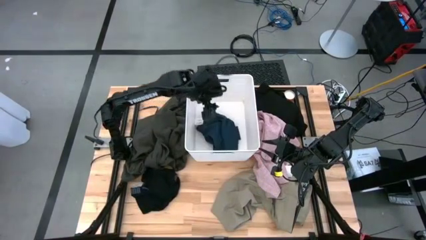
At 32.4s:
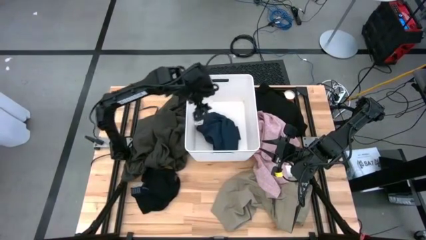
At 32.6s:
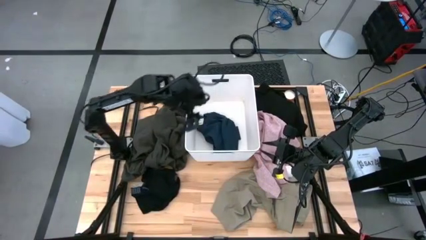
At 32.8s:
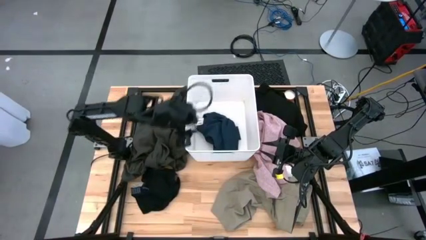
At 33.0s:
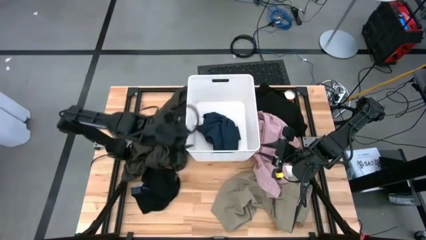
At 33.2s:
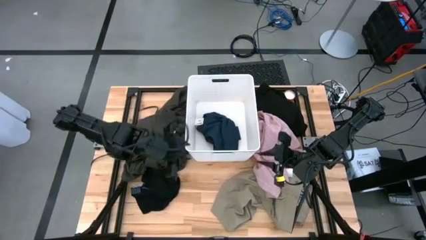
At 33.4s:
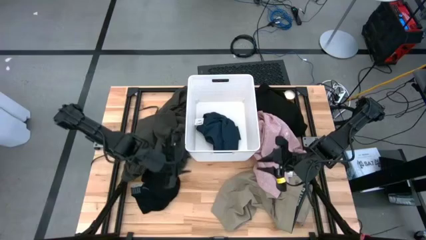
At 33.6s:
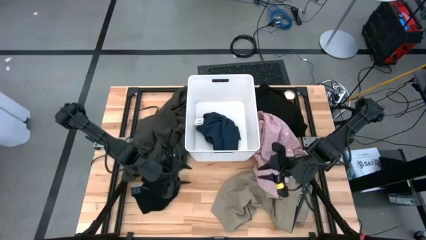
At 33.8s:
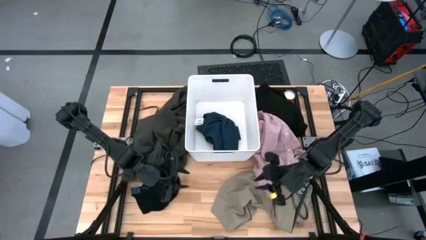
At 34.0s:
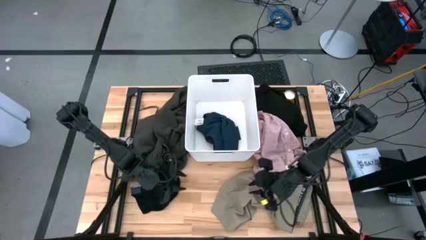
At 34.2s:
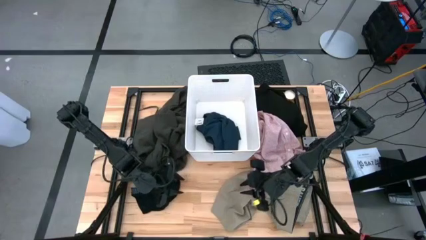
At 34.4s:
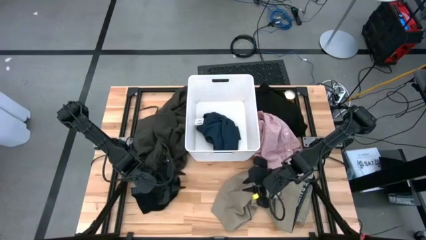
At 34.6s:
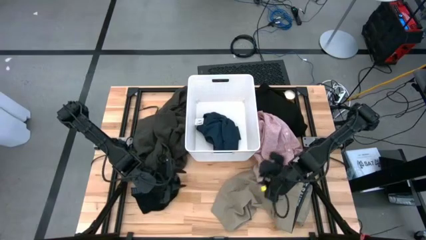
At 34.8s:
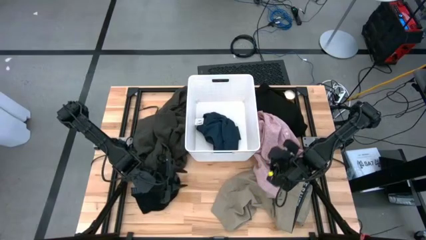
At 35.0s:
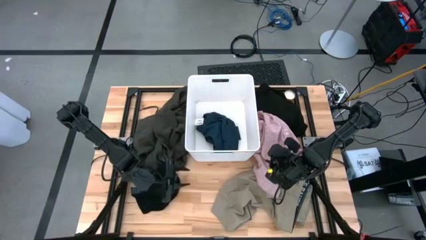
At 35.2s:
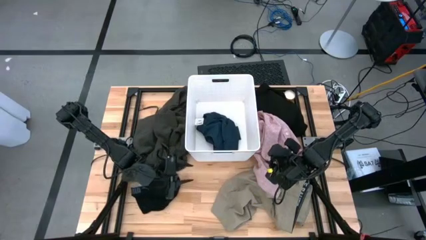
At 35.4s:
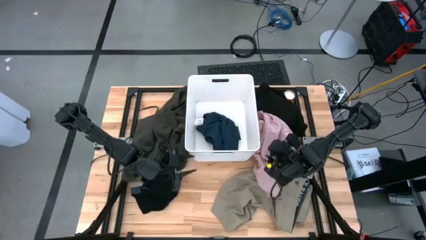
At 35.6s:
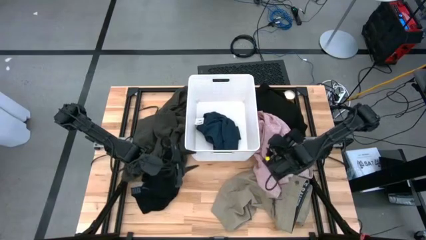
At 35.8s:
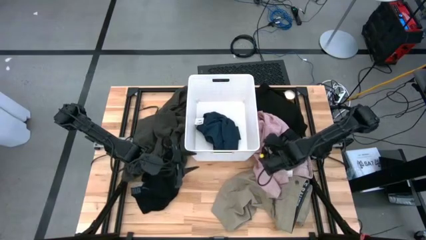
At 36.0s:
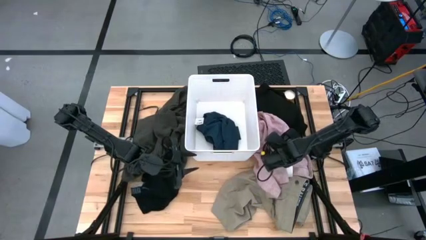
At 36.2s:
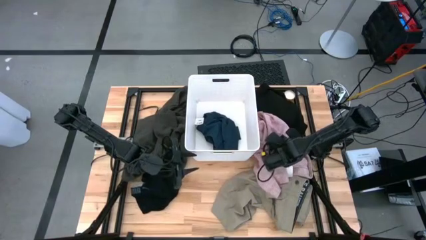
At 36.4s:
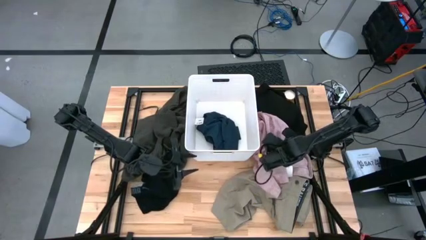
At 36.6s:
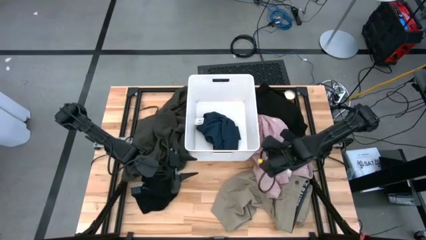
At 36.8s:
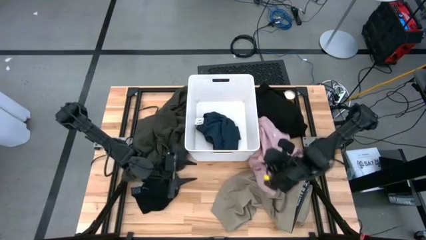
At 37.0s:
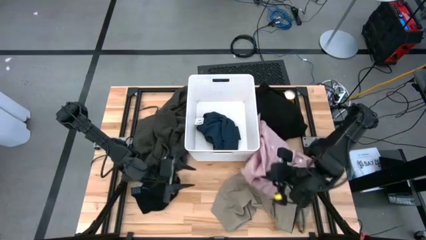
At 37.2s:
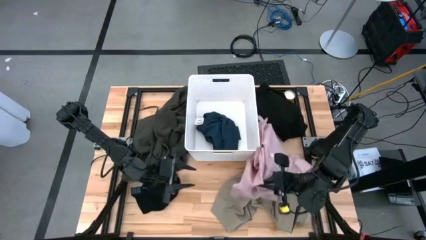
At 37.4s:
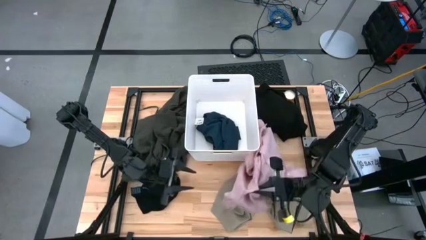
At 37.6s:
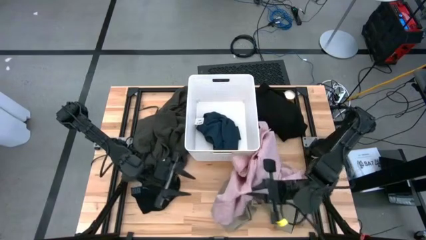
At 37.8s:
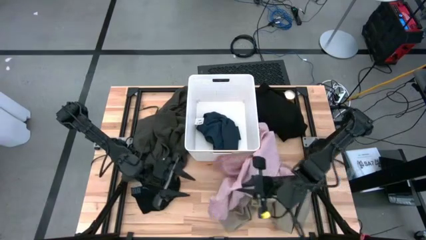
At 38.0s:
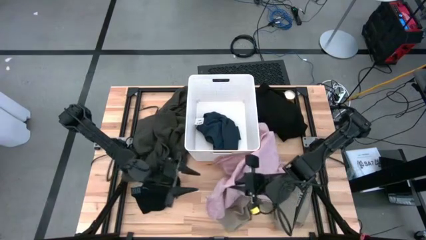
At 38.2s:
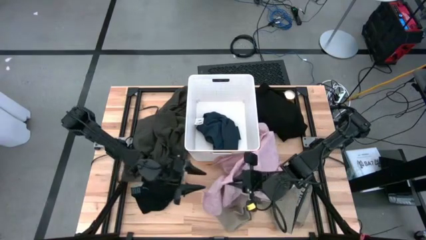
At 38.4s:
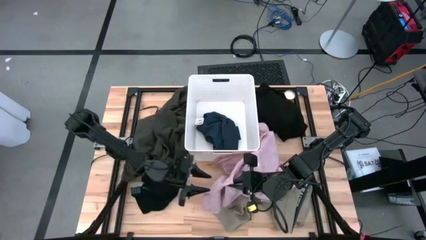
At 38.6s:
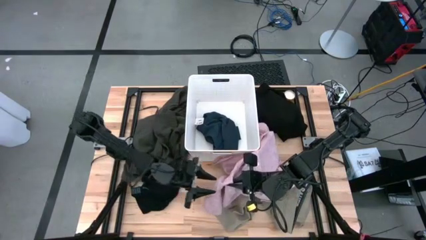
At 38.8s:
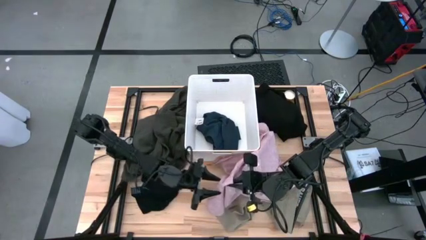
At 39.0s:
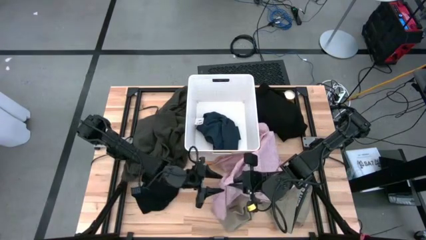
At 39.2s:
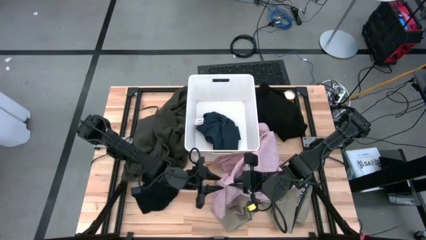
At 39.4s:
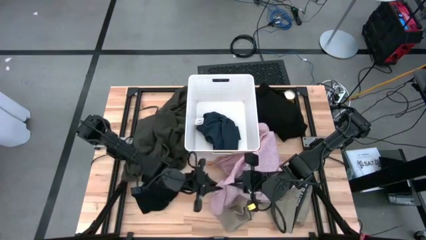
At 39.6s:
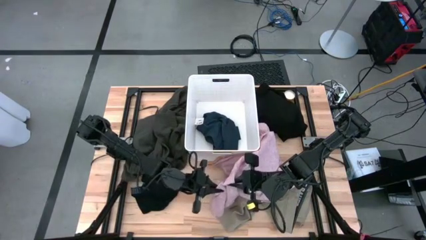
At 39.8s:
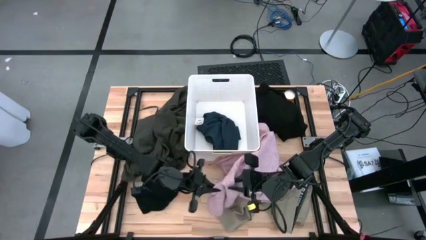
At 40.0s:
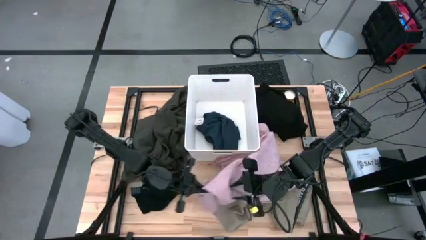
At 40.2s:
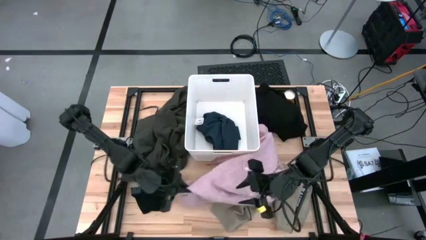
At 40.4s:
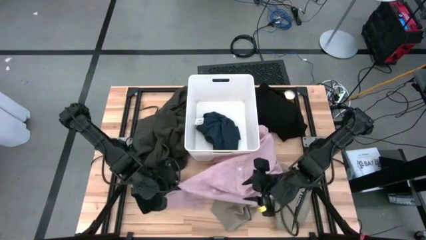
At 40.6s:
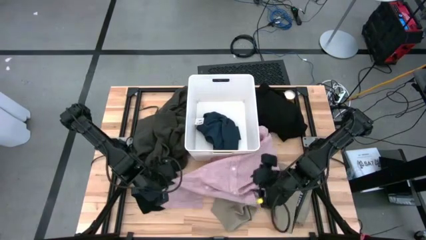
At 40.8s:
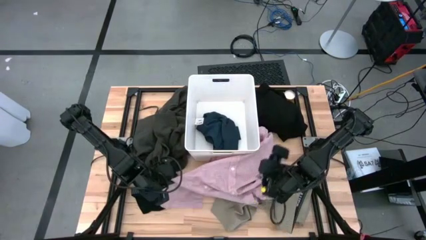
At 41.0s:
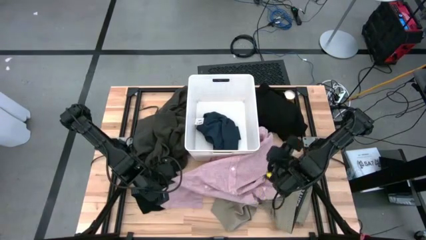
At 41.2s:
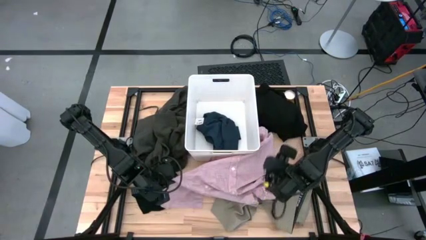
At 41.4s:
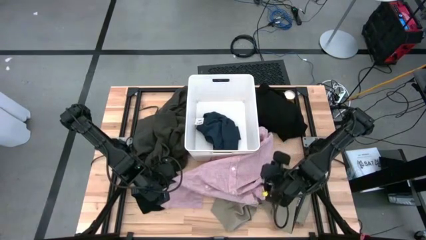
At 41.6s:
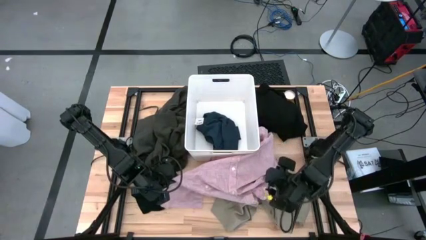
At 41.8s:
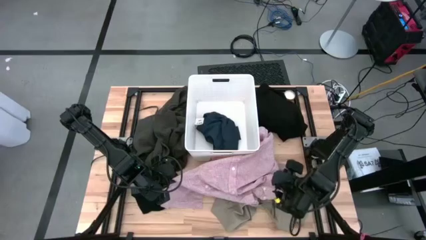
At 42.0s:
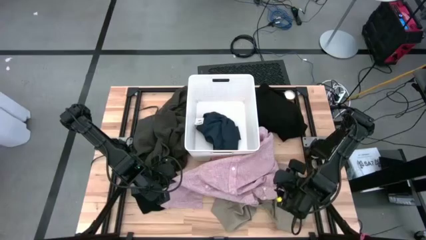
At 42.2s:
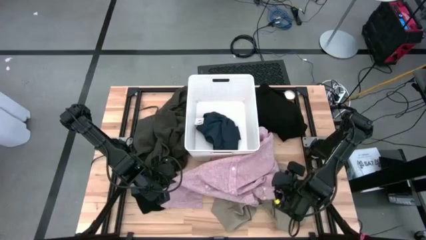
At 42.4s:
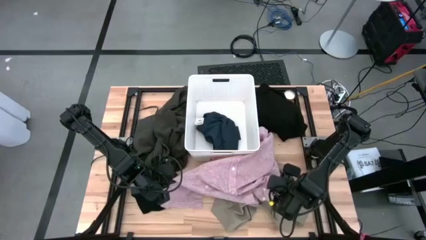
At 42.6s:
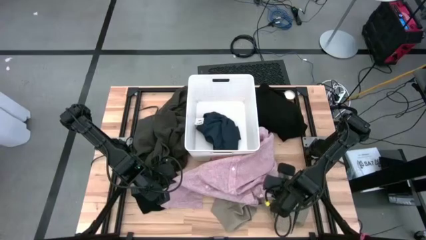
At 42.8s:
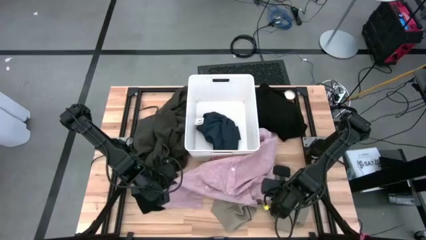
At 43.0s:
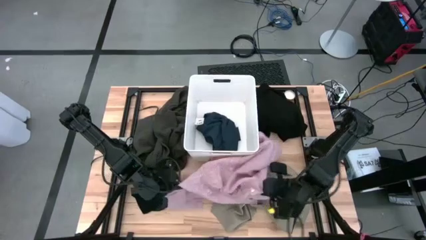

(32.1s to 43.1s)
Task: Sort clothes
Put the pink shirt into the white laundry bin

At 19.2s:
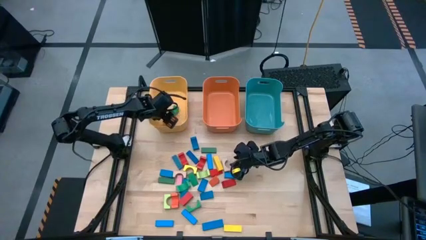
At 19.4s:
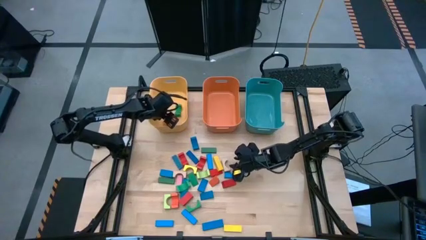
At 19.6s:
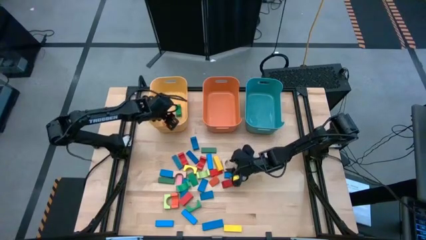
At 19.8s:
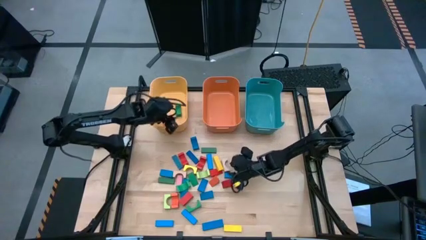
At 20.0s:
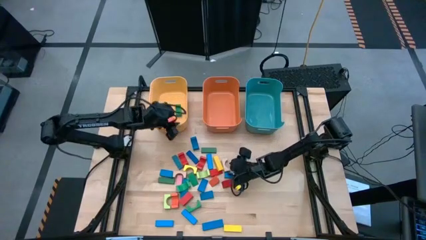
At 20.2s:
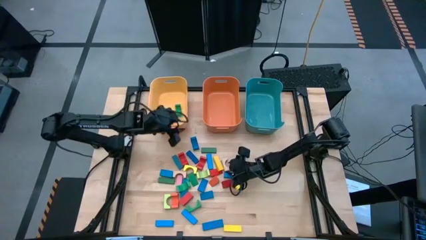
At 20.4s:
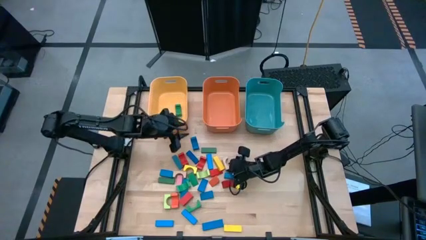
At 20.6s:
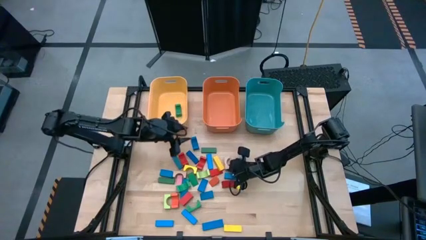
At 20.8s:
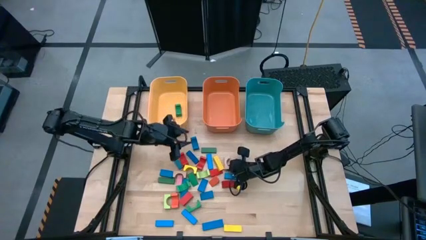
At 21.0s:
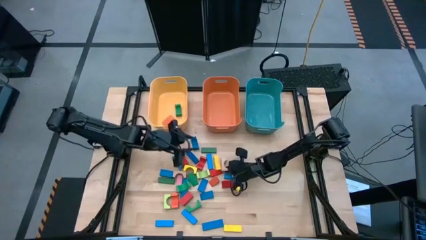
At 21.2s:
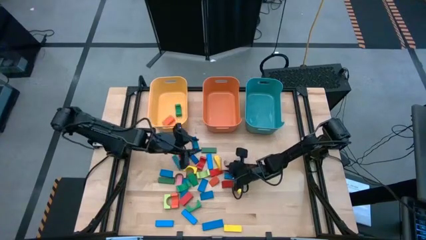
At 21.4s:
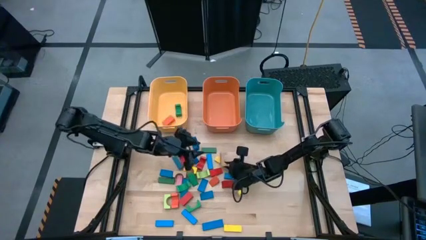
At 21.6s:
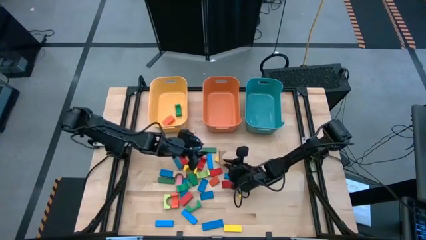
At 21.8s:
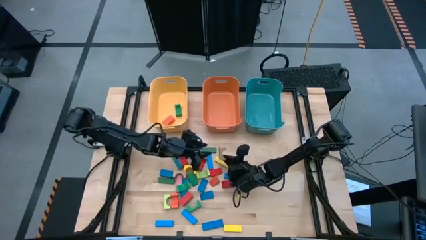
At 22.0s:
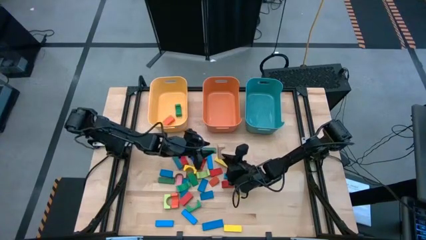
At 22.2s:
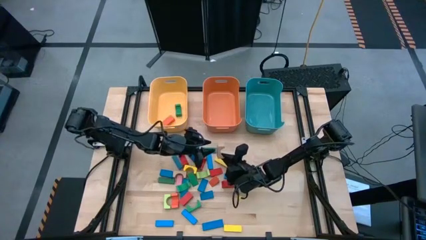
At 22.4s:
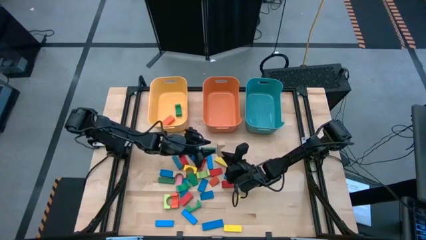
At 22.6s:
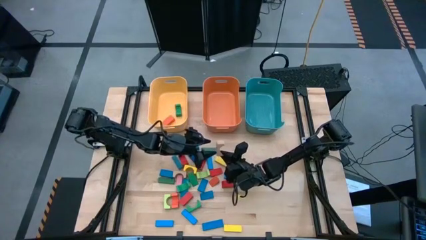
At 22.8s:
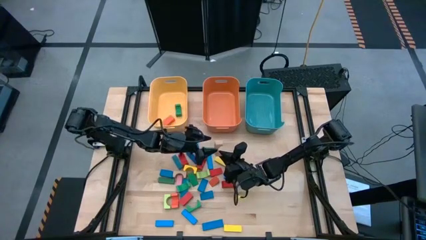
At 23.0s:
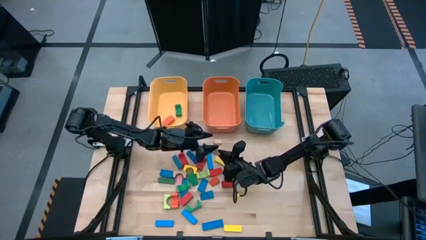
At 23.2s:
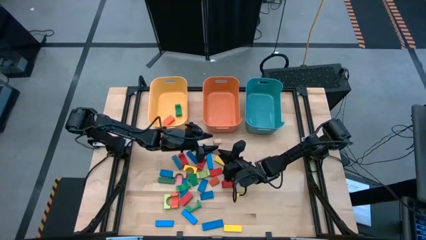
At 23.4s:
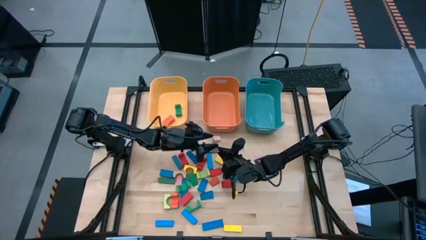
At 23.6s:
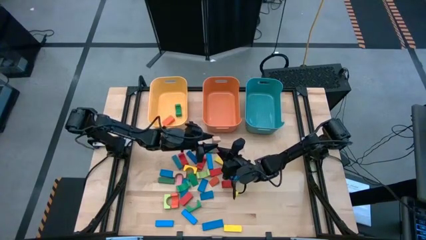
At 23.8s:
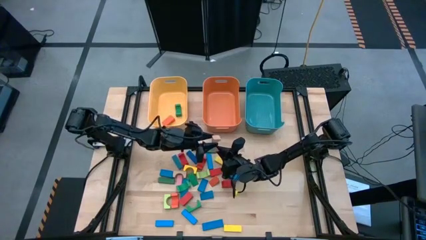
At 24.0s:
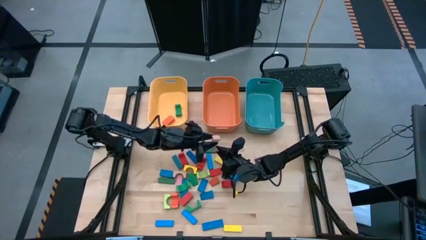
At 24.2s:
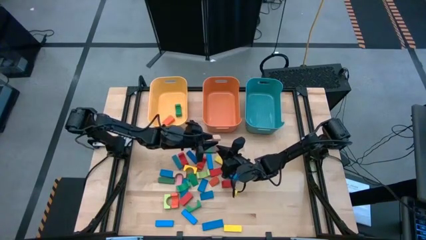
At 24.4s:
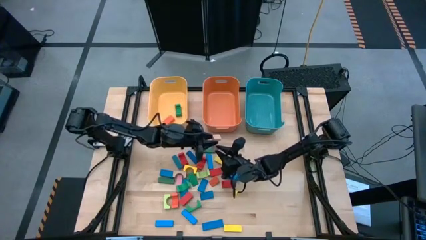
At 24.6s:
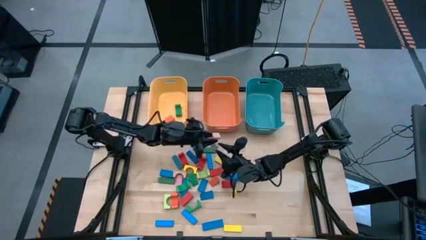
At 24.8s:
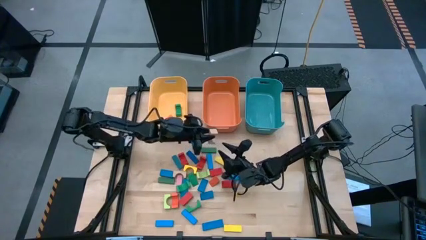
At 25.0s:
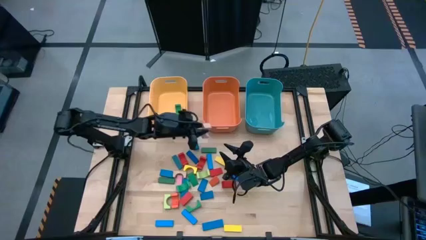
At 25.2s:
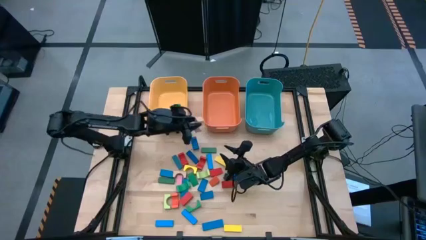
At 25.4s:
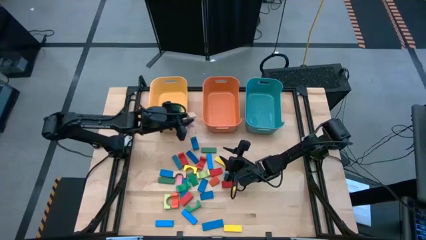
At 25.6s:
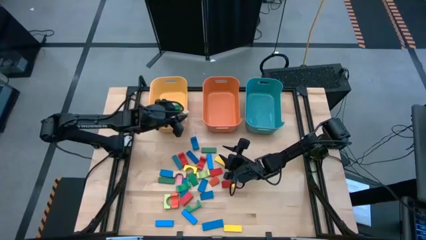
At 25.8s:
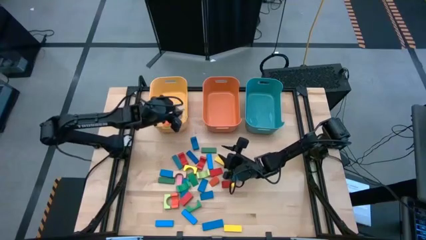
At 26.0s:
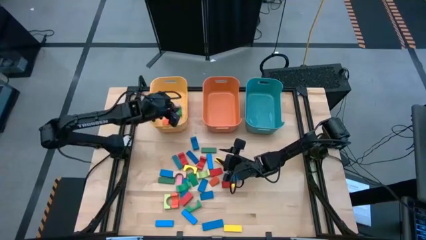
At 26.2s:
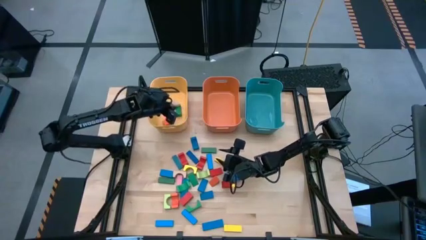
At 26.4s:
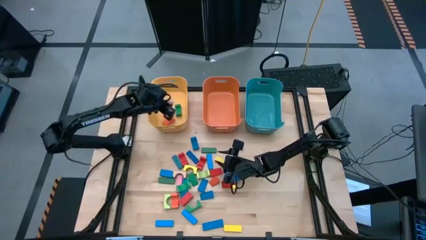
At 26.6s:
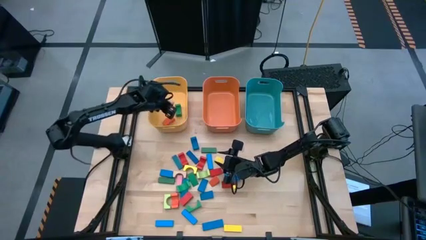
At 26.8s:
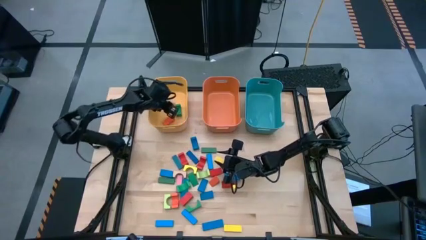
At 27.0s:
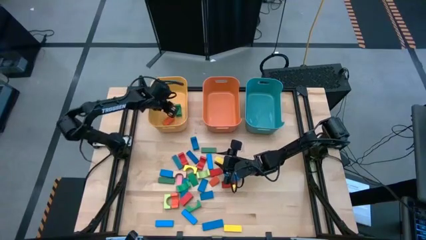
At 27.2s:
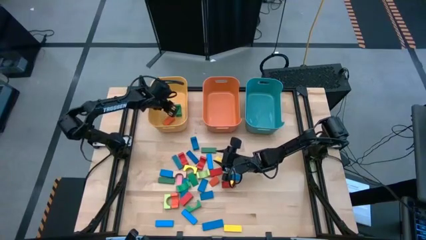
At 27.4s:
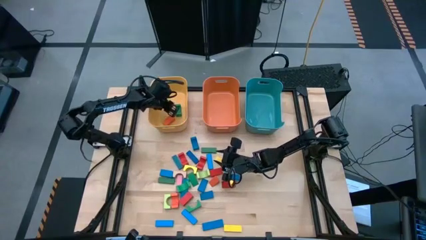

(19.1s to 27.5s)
Task: Sort blocks by size
Put the gray arch block into the yellow bin
